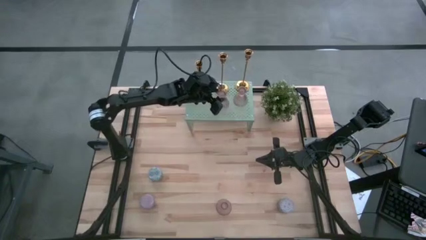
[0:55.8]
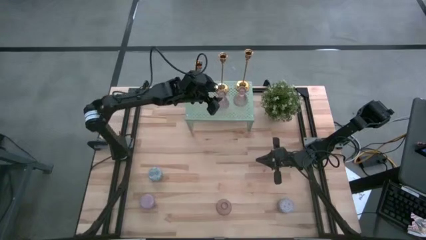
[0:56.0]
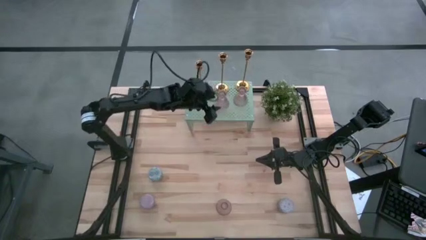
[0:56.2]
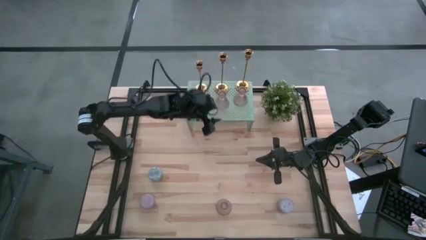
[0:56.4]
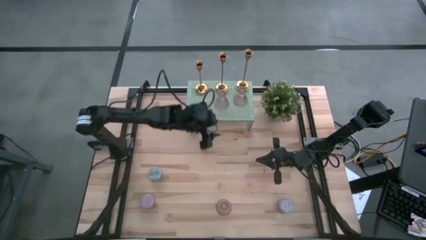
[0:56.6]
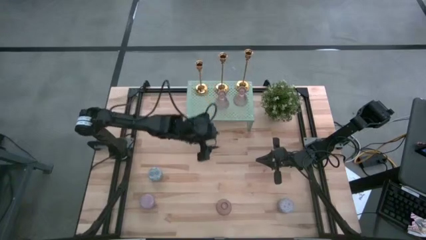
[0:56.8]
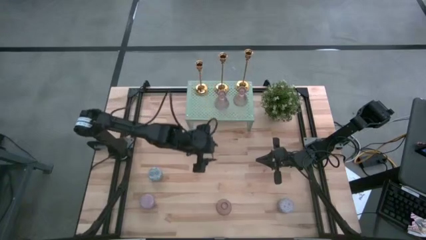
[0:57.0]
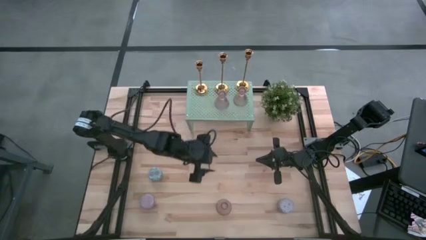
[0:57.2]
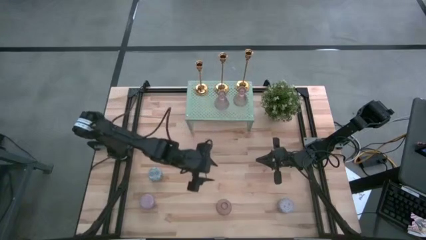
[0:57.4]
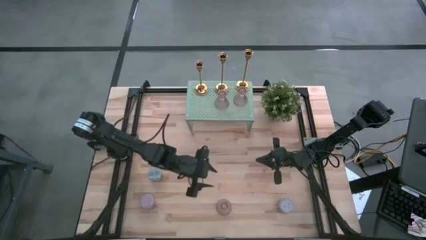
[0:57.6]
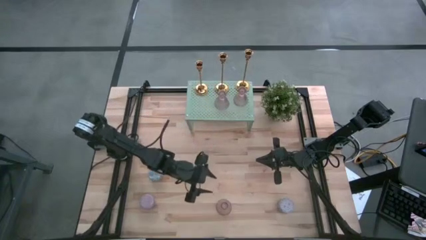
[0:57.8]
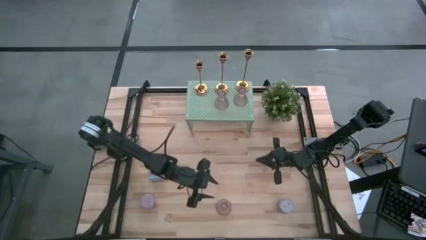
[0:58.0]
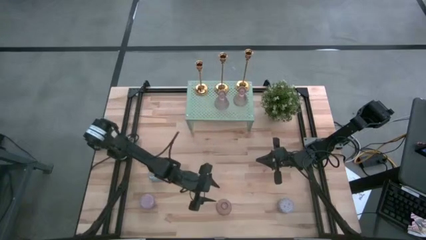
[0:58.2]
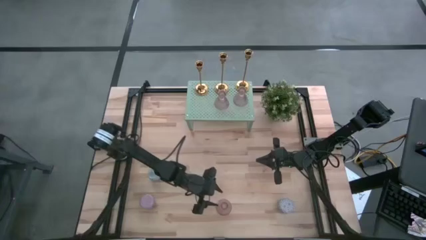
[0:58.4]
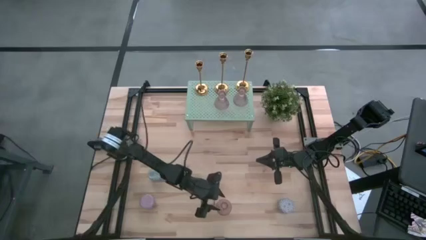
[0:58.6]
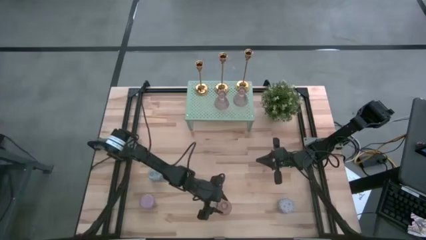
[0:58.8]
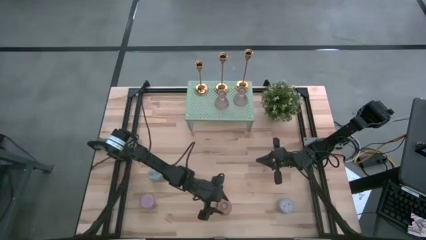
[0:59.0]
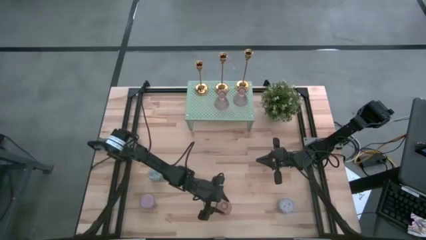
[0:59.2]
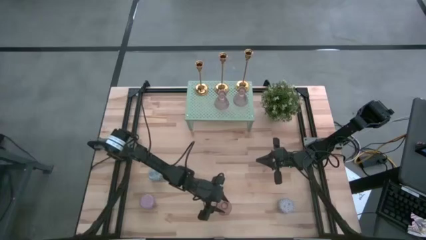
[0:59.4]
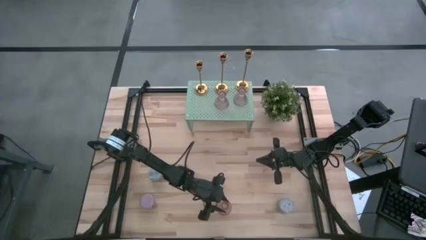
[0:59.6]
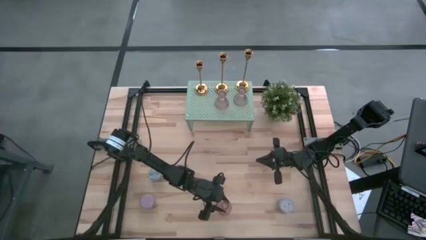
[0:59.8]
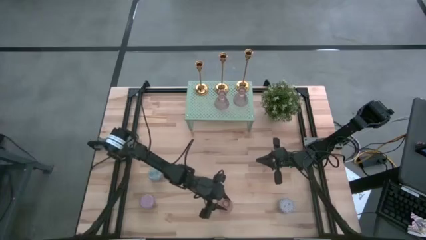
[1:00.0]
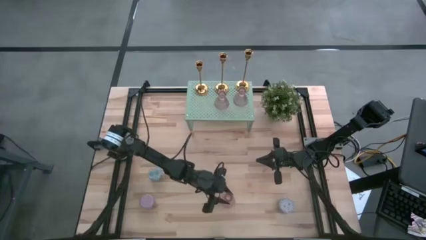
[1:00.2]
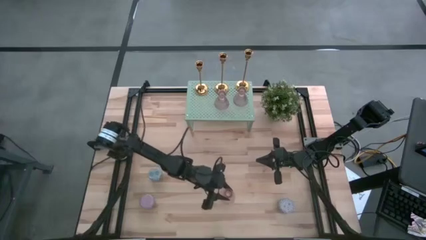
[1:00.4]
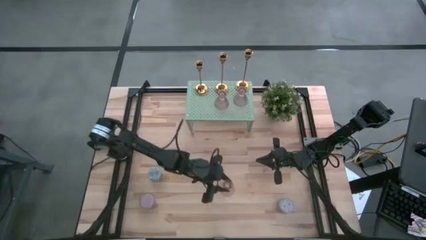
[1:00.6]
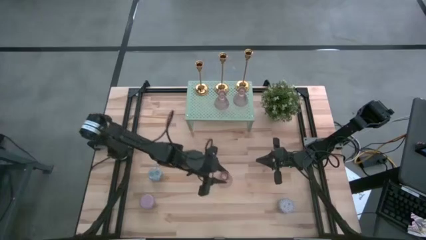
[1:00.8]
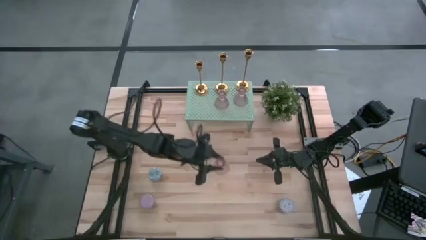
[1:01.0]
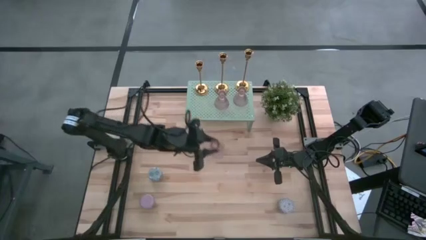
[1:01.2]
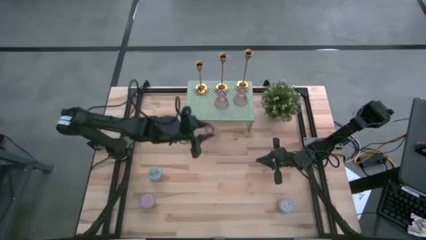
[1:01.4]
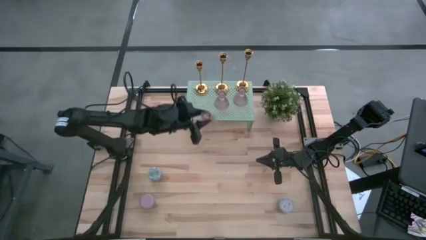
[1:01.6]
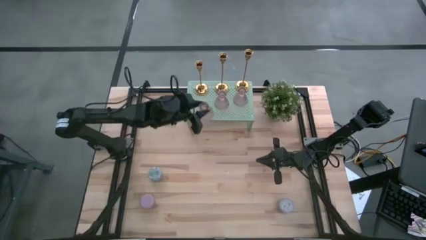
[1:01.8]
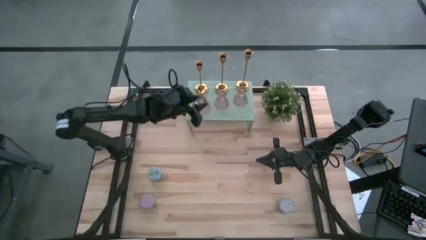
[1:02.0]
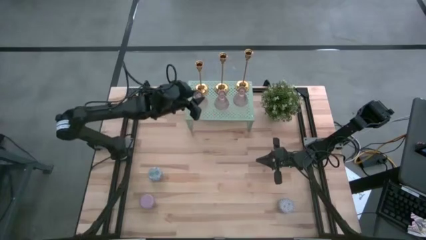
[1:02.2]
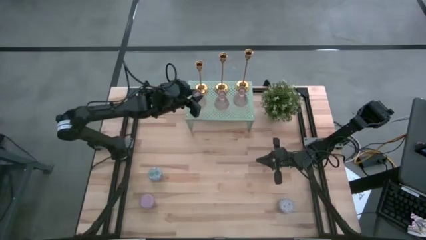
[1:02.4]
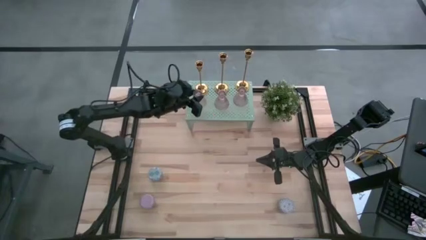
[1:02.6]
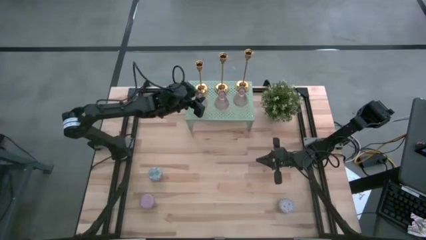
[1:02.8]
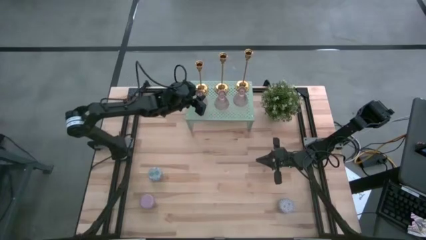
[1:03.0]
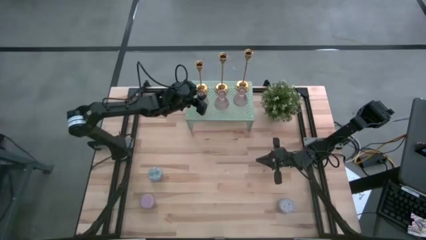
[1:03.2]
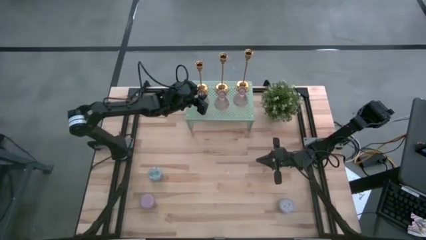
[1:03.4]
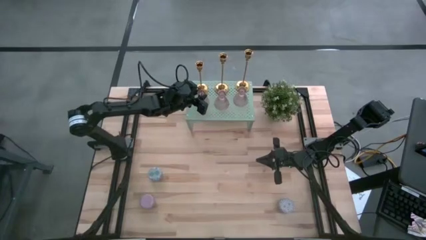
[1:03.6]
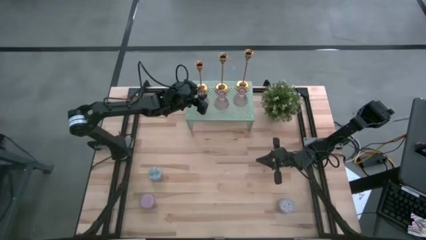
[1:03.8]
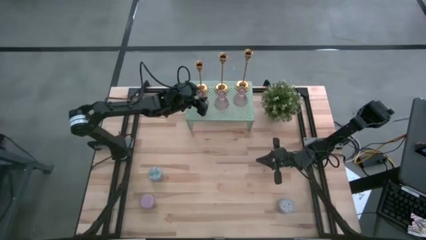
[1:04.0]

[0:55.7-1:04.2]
Task: Pick & Place candle stick holders
Put the pink glass candle holder on the shelf aligned with the other pink glass candle holders

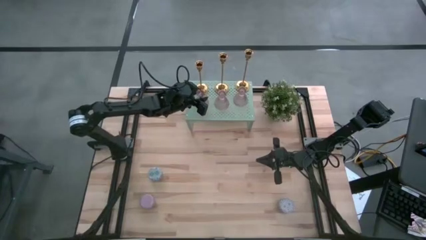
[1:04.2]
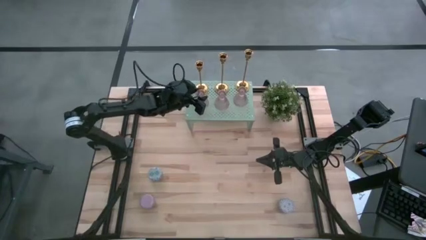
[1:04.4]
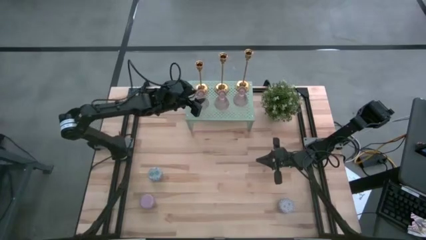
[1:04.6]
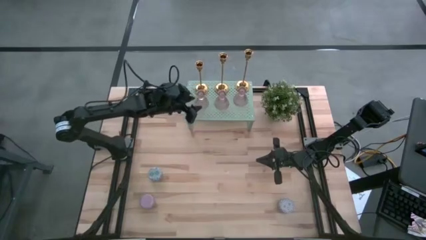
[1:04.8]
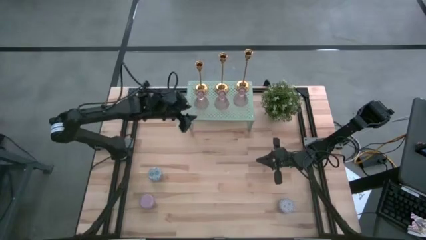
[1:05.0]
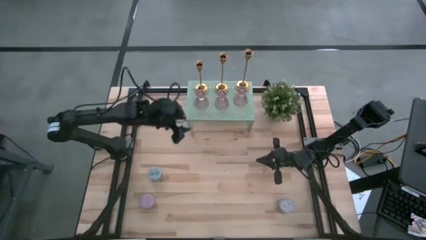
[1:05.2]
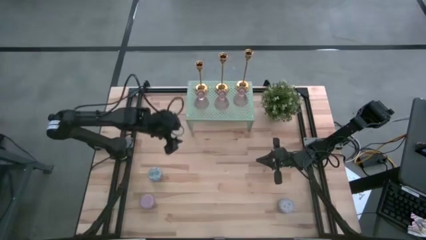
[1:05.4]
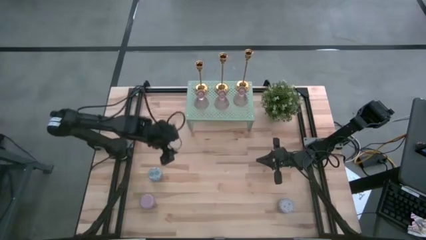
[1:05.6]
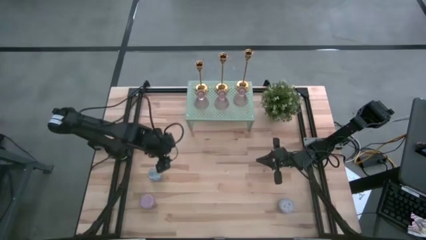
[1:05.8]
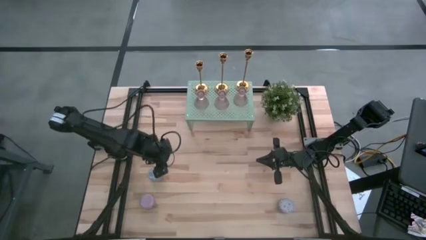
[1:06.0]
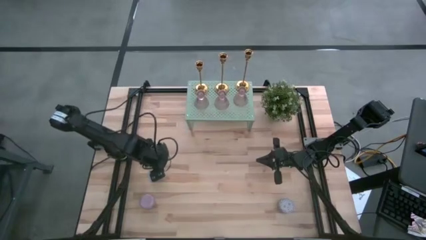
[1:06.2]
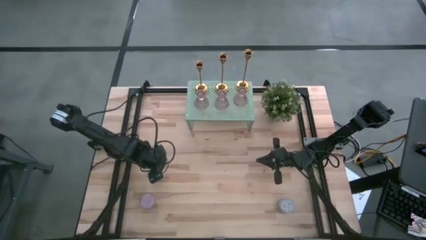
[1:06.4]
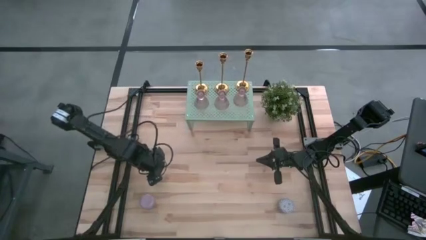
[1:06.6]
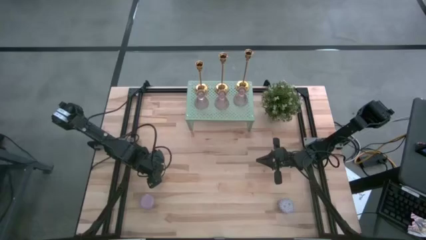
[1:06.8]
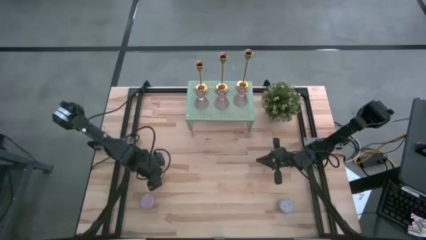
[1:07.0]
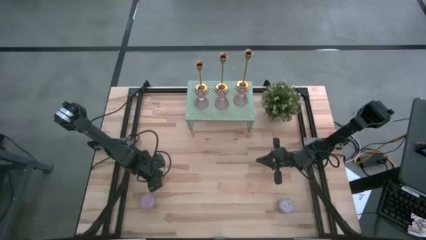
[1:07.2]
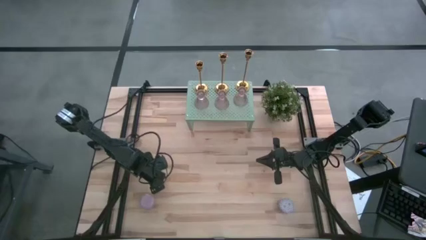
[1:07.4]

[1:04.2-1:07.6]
Put the green patterned scented candle on the shelf
